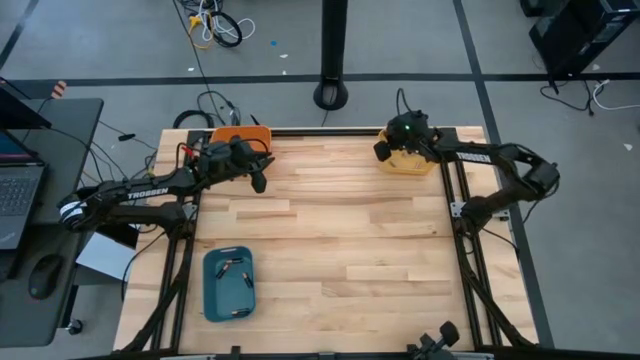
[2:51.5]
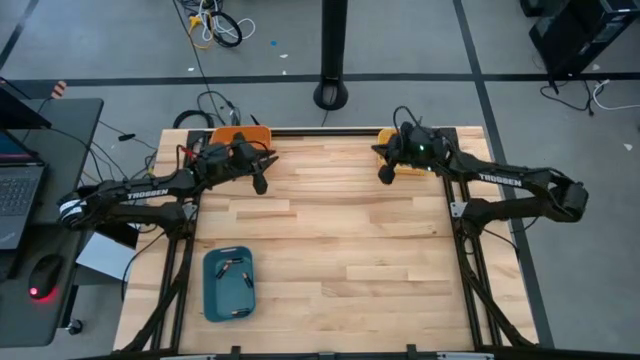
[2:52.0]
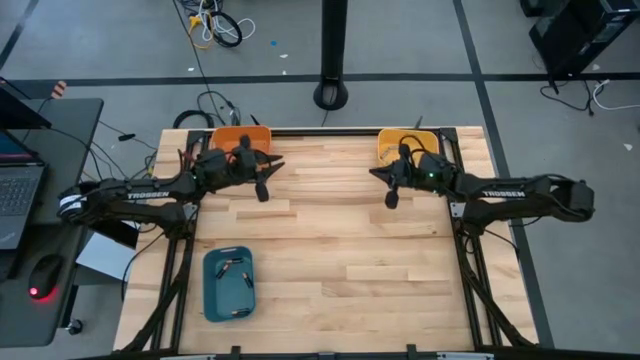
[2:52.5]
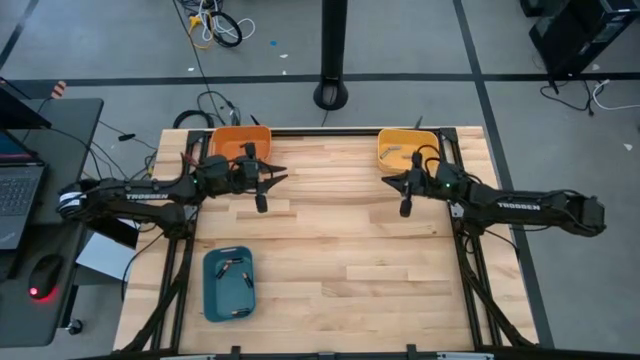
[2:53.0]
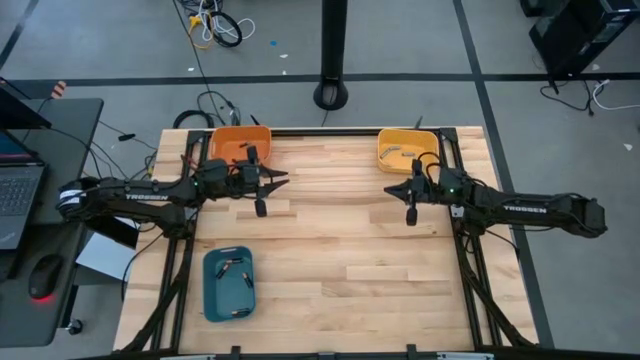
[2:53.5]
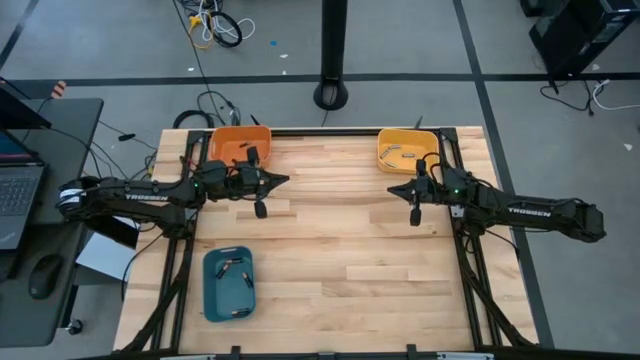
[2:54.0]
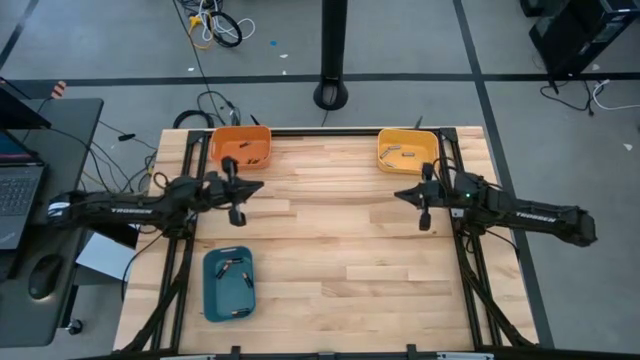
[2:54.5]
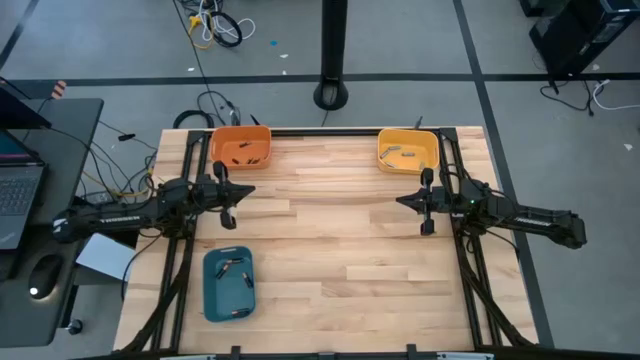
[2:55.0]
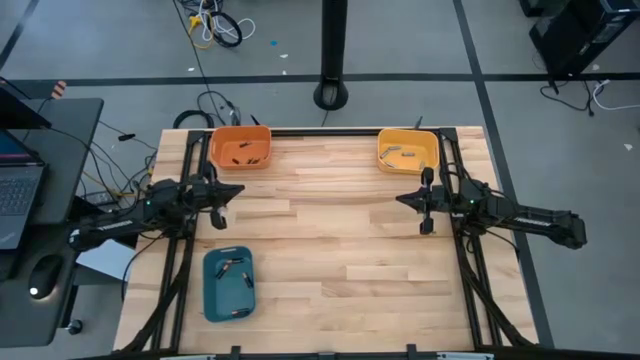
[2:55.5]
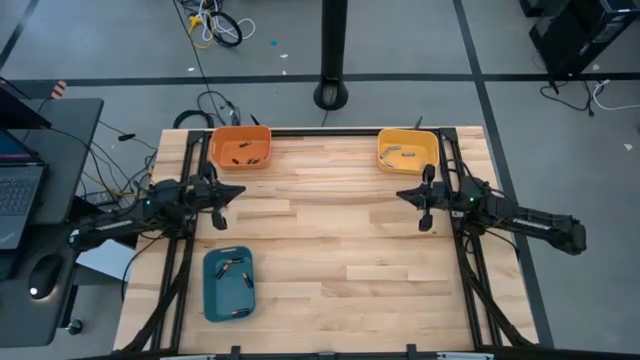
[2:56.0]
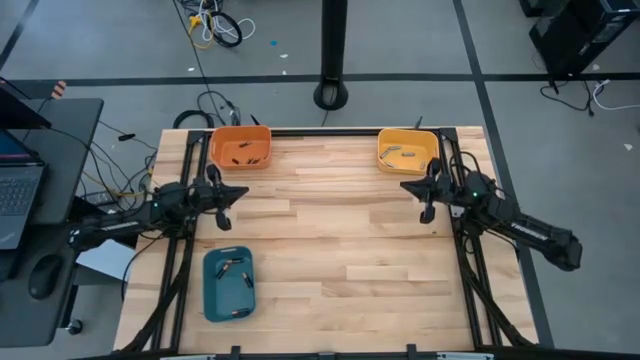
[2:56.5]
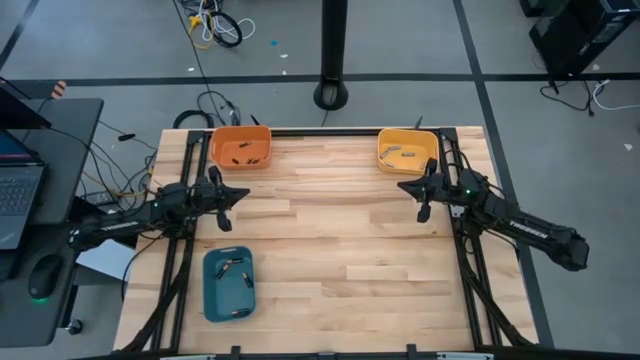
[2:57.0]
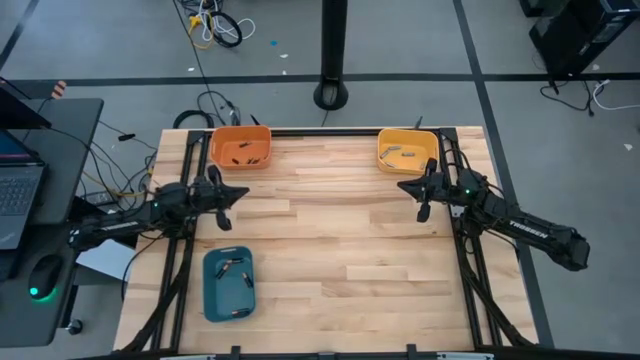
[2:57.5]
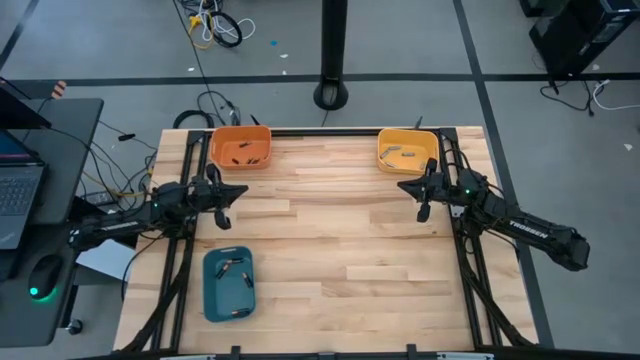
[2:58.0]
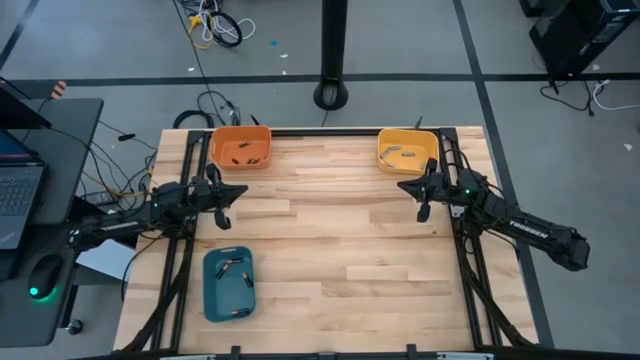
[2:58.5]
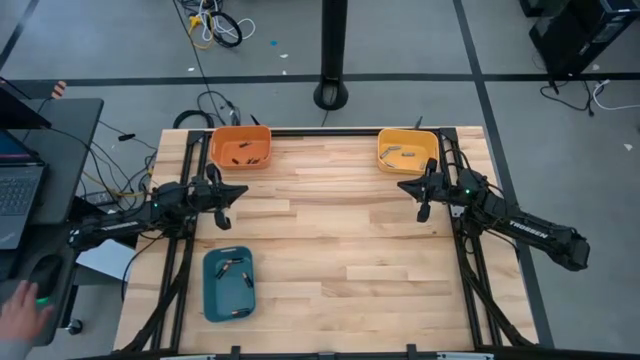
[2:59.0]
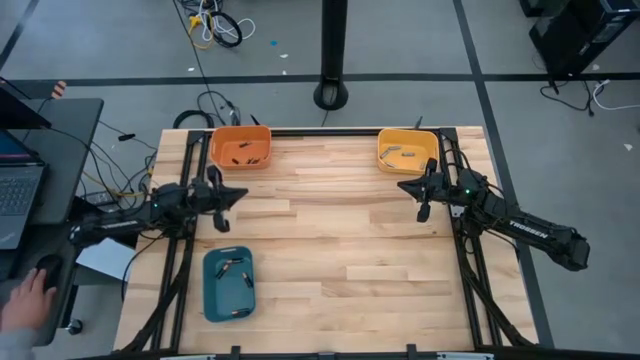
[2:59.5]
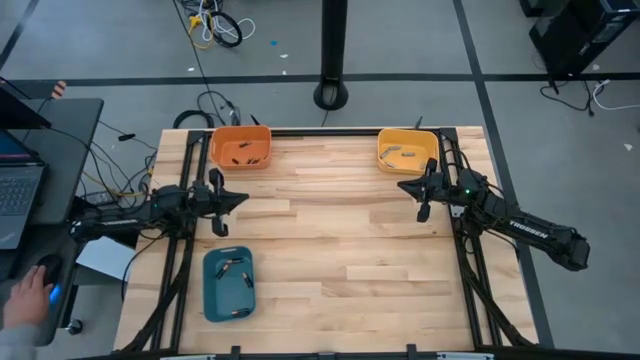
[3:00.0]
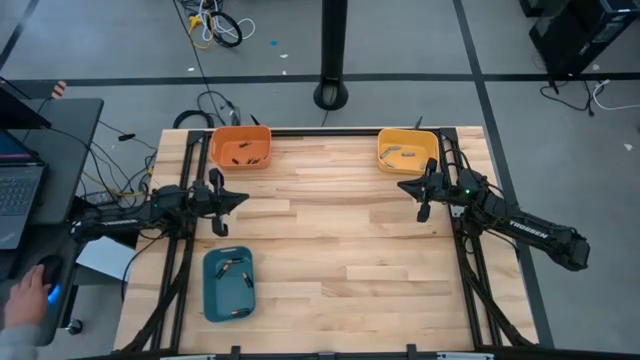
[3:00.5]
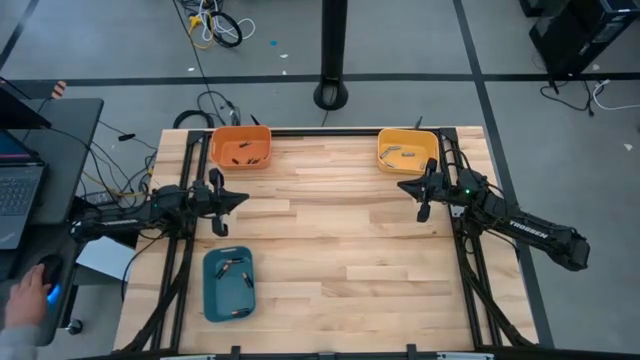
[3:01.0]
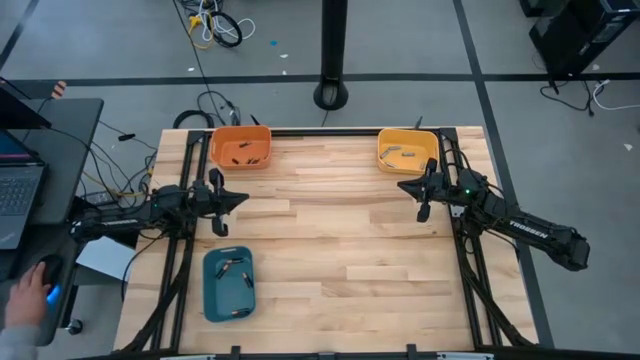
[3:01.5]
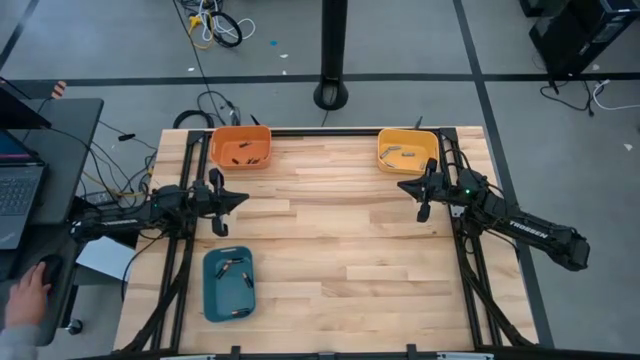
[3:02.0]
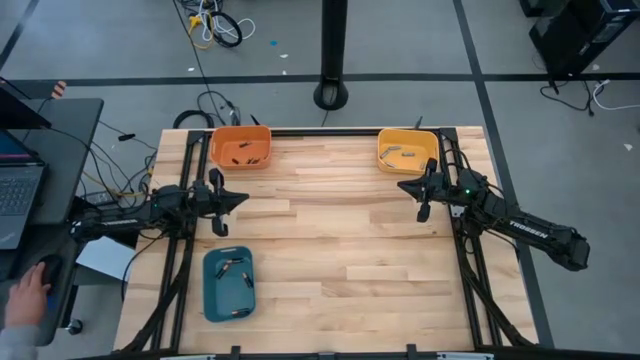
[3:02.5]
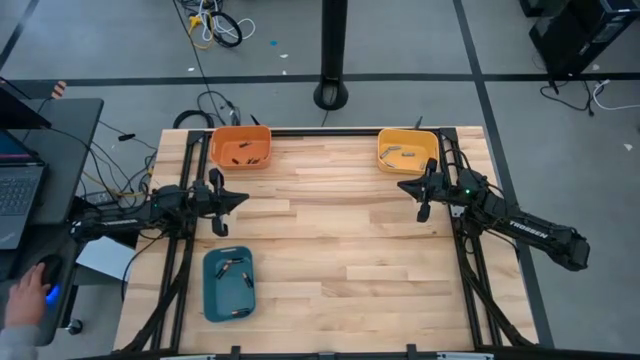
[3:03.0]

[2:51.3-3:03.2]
Task: Sort batteries
Return to Home Position

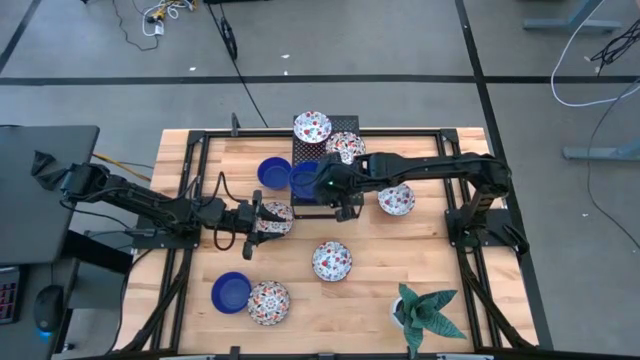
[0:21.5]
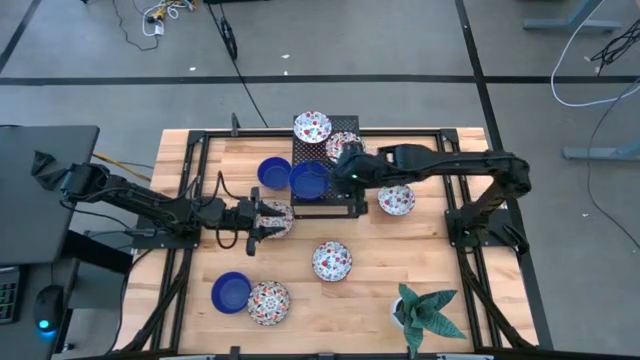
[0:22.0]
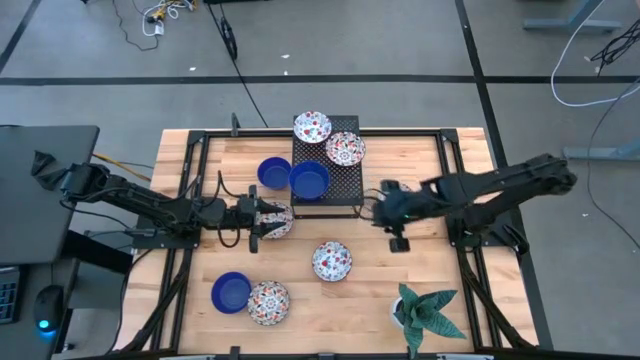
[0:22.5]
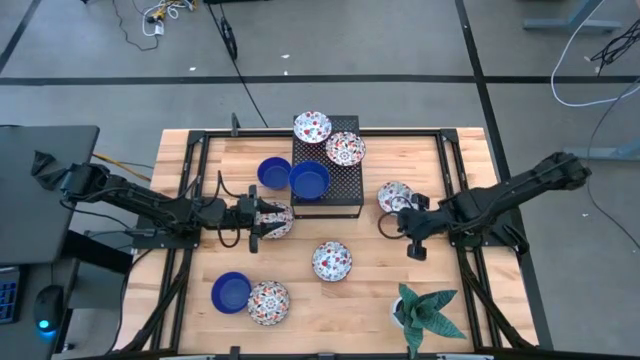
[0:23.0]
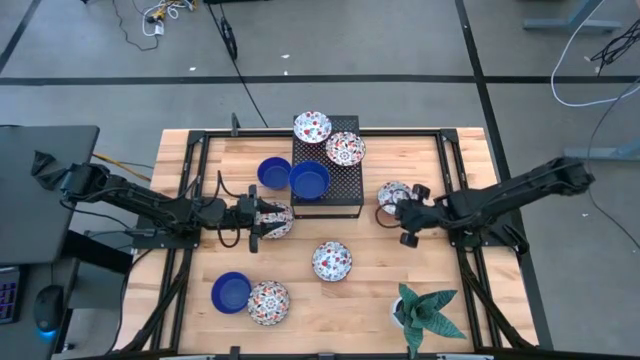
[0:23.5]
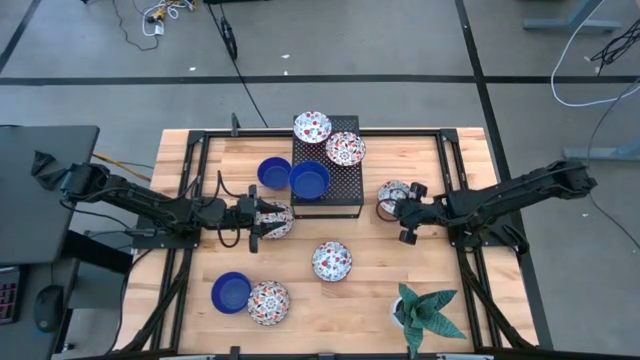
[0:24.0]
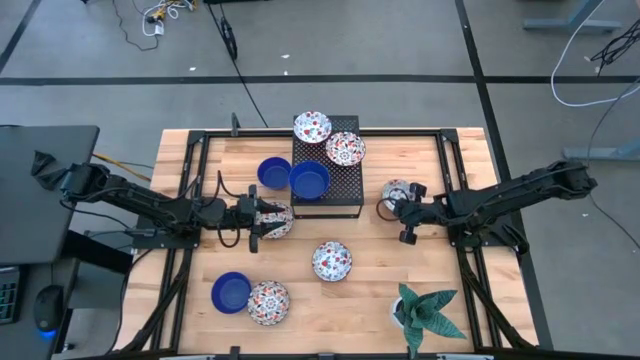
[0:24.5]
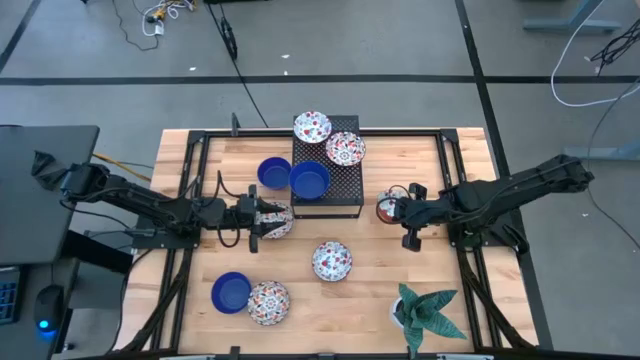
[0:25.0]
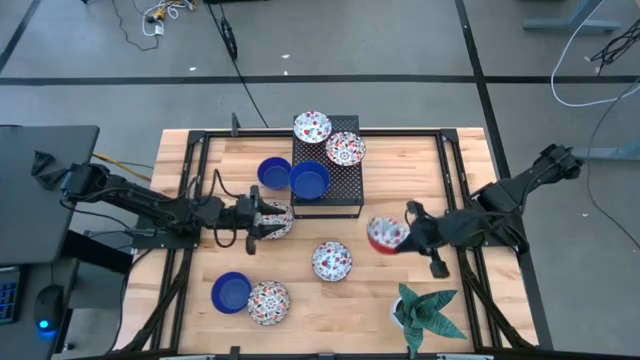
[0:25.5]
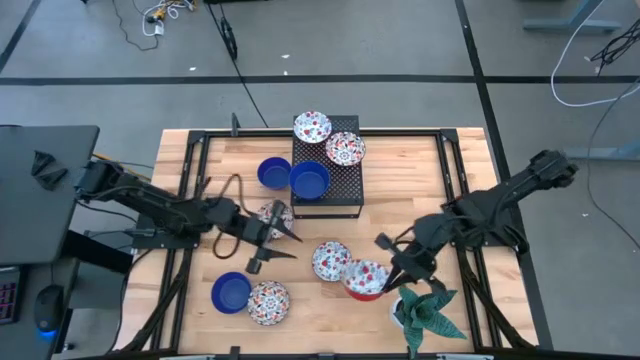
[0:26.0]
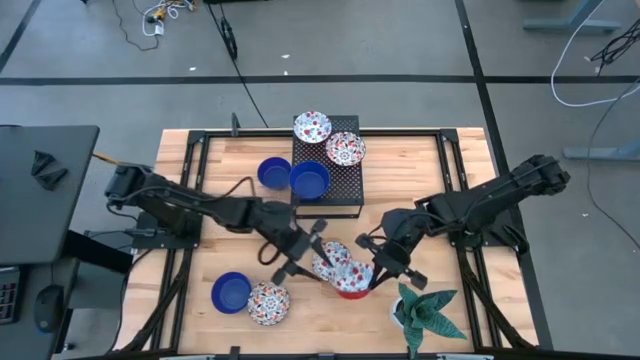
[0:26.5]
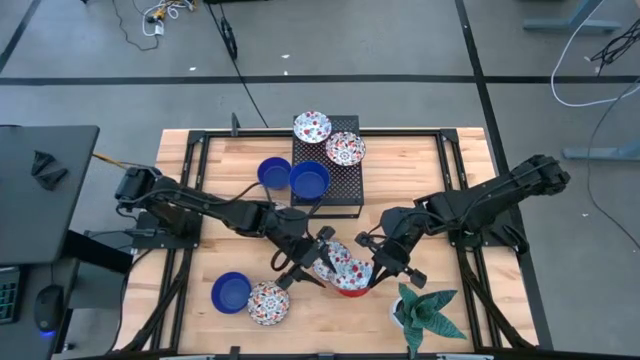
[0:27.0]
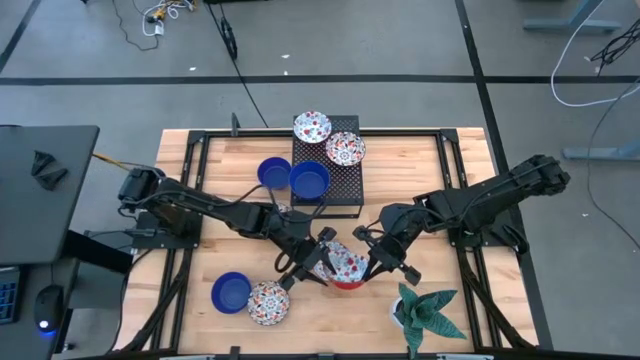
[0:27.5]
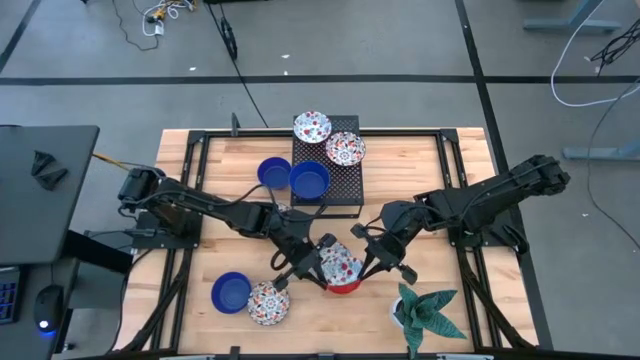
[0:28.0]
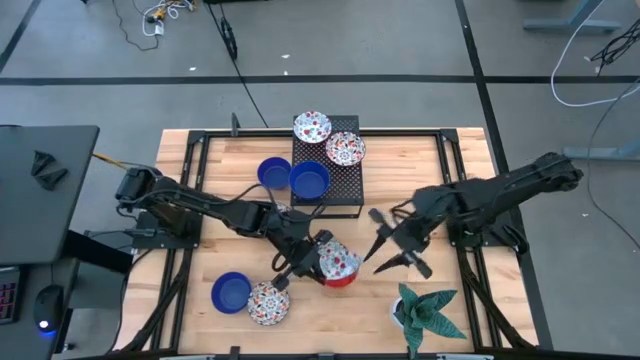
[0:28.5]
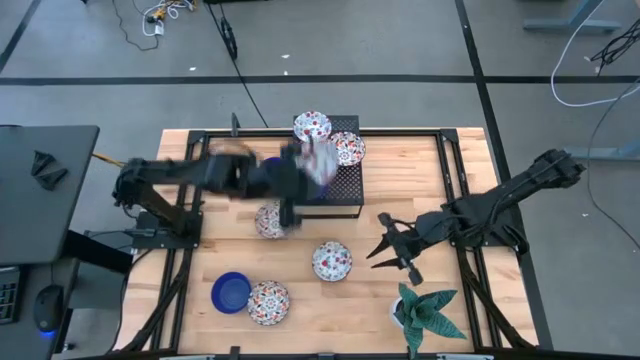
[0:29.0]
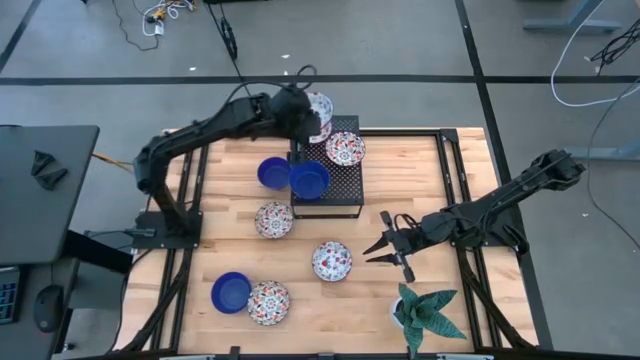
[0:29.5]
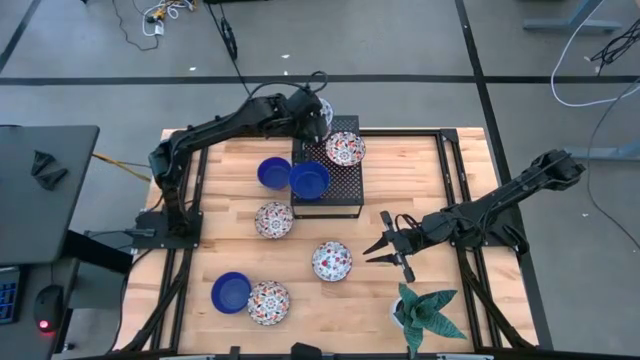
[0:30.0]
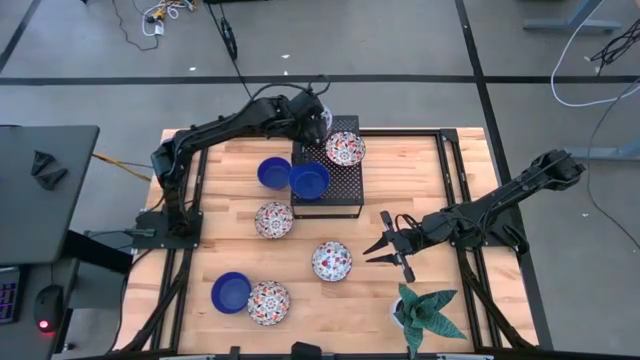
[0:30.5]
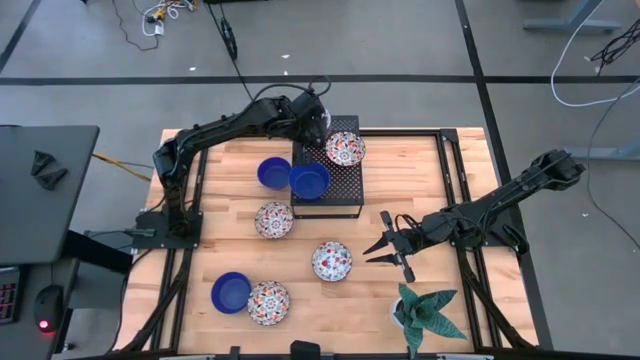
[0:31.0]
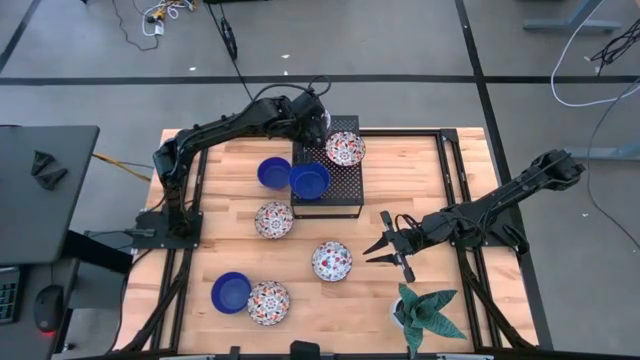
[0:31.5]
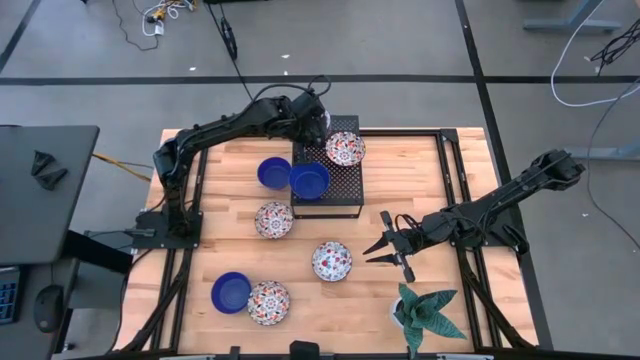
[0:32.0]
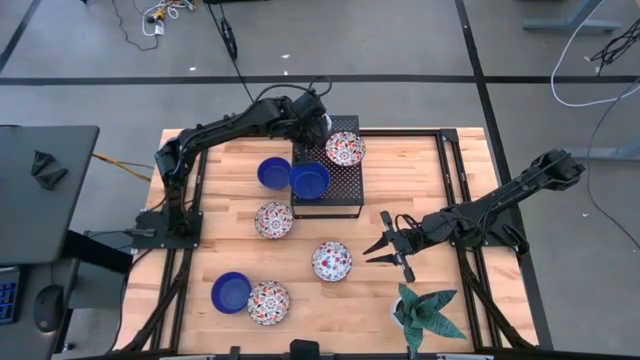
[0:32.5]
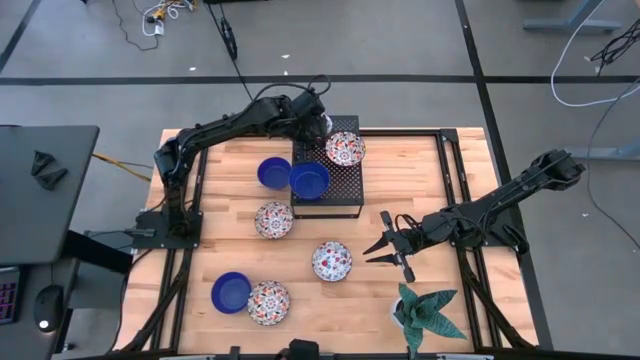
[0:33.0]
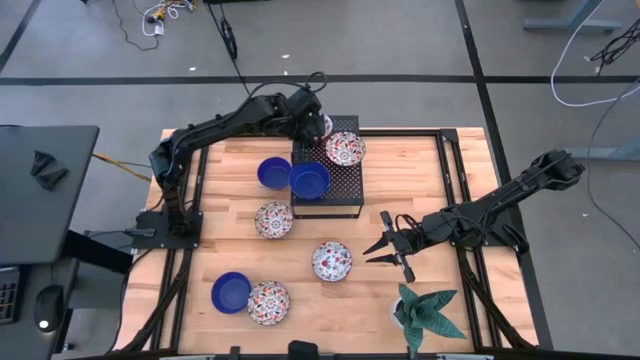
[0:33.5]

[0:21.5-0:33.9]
Task: Pick & Place Mini bowls
Stack the top red patterned bowl on the red patterned bowl on the shelf
